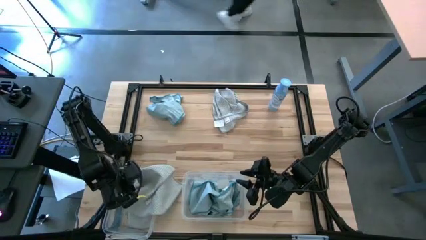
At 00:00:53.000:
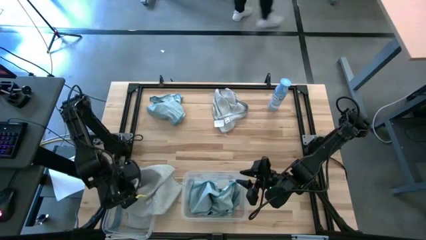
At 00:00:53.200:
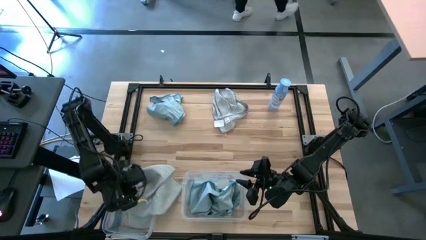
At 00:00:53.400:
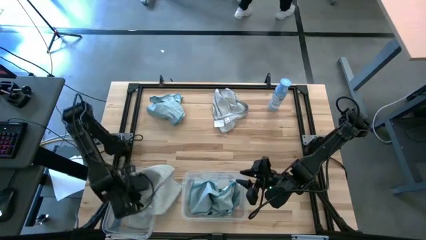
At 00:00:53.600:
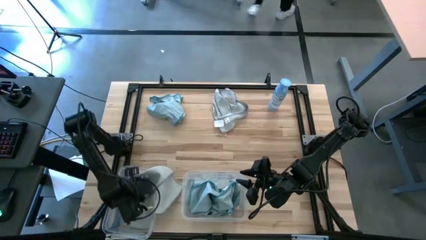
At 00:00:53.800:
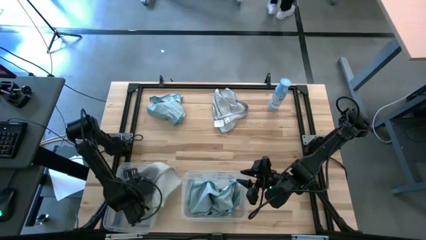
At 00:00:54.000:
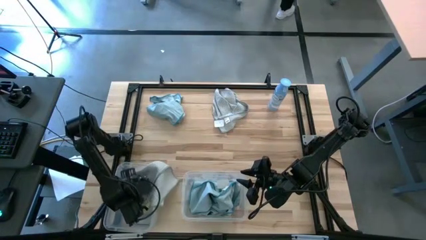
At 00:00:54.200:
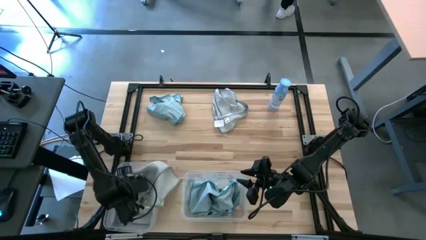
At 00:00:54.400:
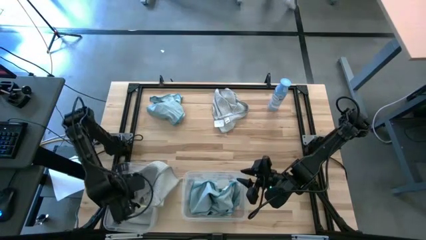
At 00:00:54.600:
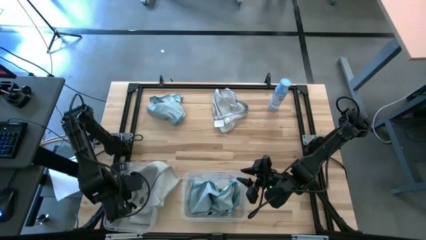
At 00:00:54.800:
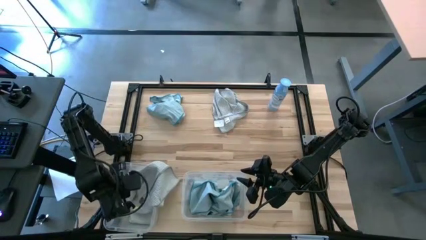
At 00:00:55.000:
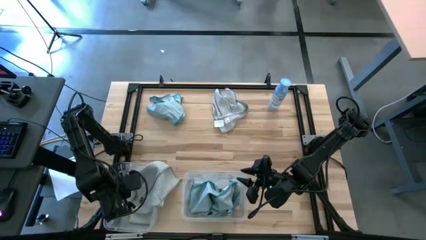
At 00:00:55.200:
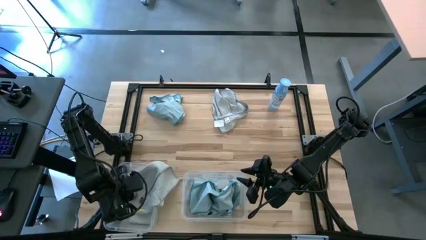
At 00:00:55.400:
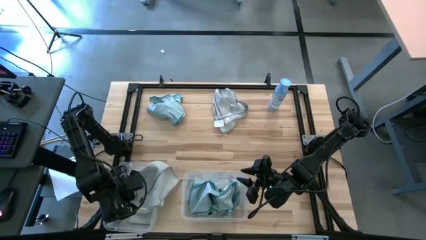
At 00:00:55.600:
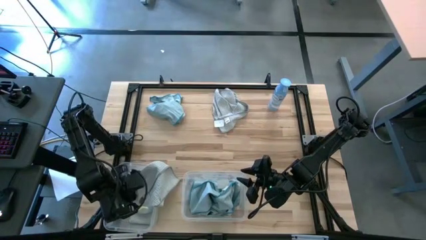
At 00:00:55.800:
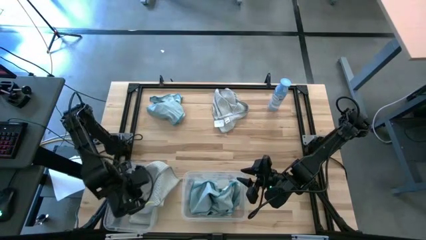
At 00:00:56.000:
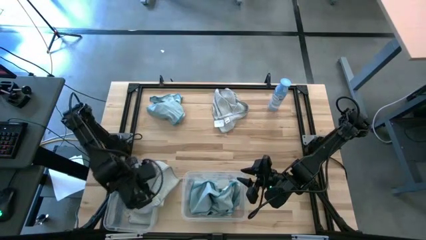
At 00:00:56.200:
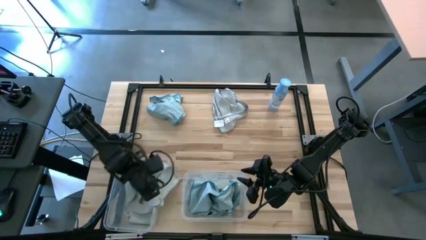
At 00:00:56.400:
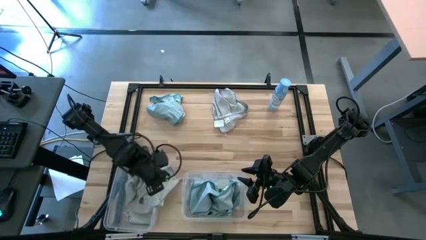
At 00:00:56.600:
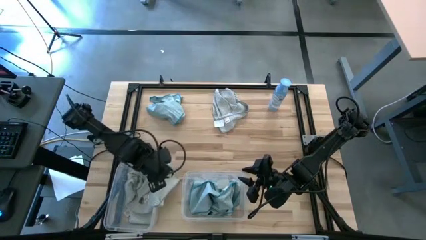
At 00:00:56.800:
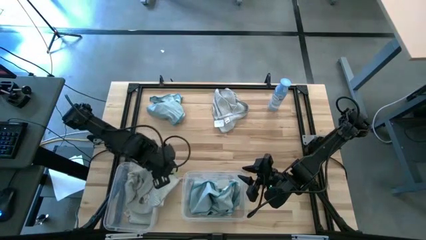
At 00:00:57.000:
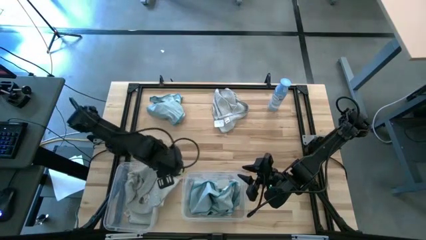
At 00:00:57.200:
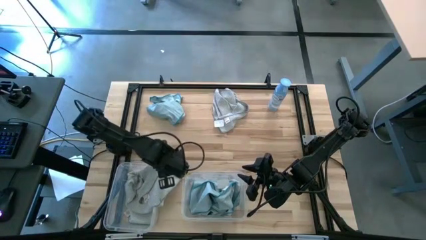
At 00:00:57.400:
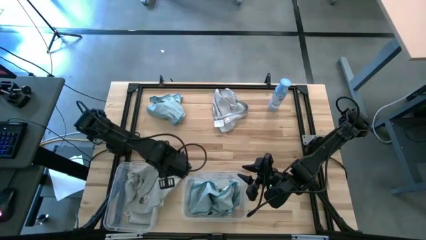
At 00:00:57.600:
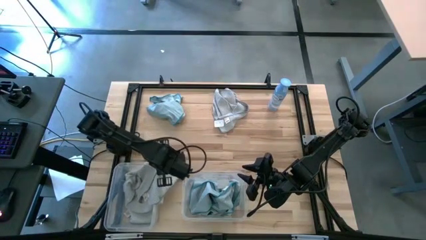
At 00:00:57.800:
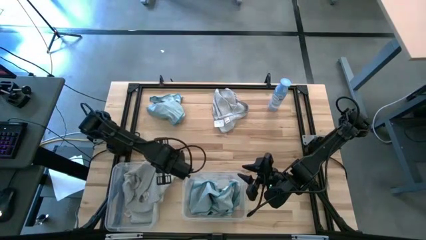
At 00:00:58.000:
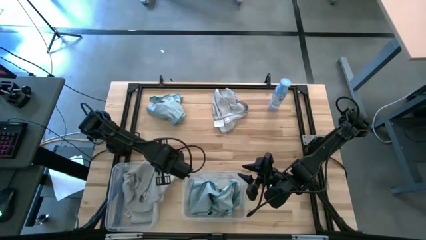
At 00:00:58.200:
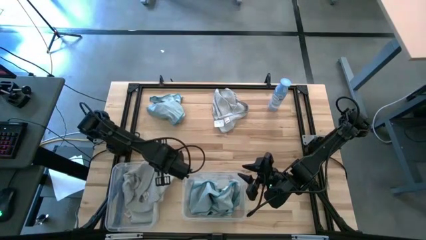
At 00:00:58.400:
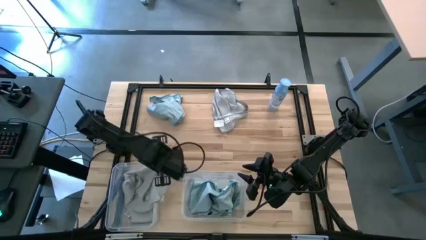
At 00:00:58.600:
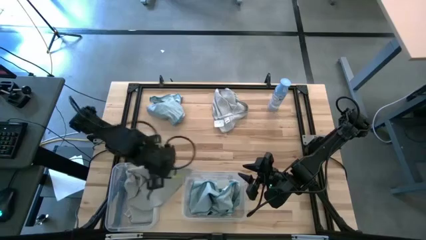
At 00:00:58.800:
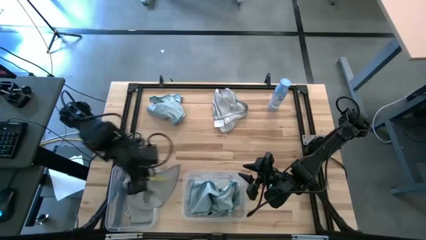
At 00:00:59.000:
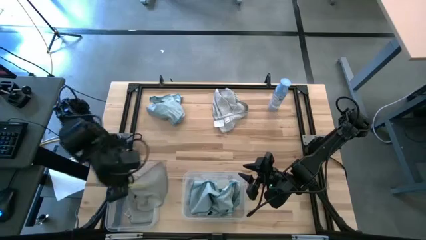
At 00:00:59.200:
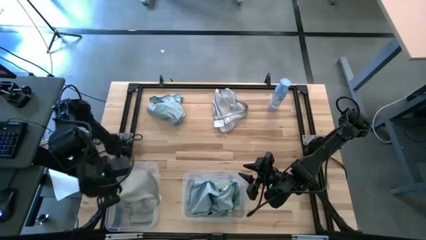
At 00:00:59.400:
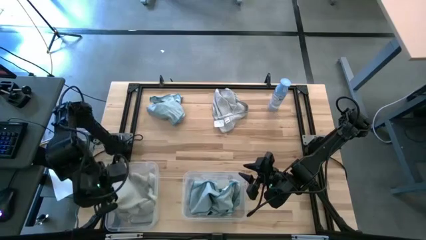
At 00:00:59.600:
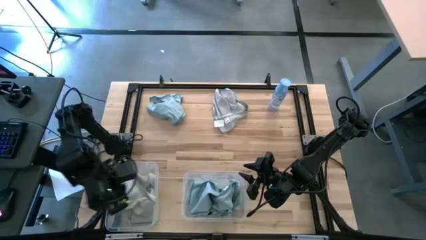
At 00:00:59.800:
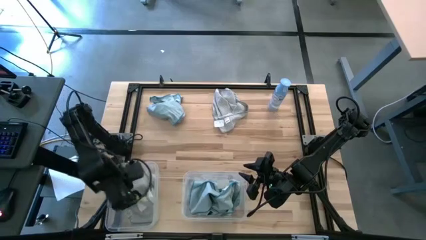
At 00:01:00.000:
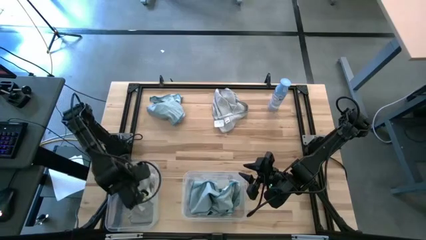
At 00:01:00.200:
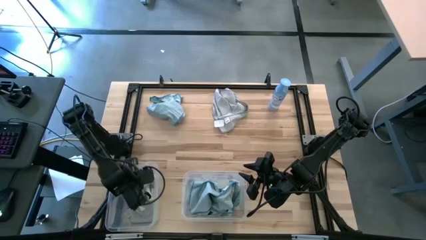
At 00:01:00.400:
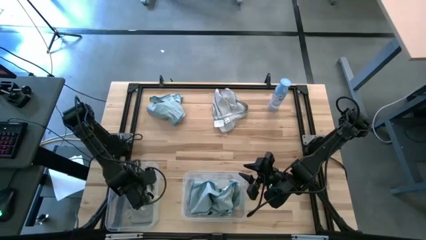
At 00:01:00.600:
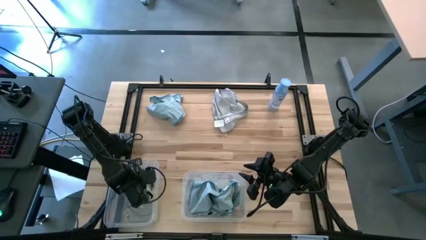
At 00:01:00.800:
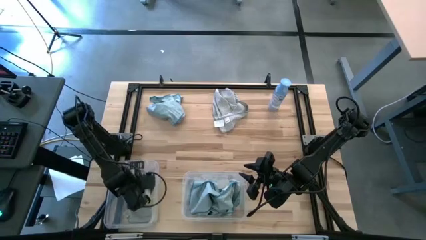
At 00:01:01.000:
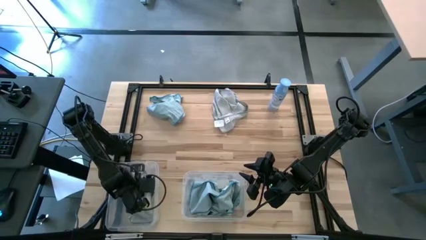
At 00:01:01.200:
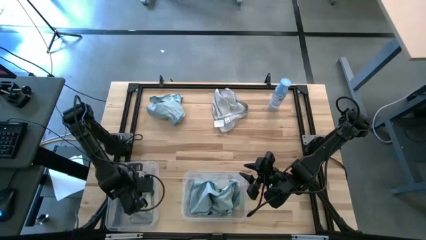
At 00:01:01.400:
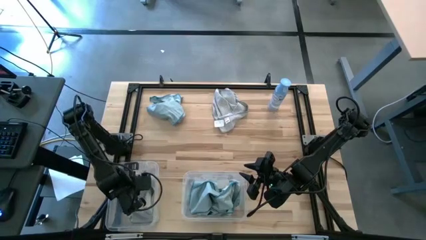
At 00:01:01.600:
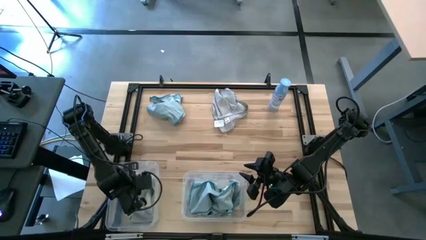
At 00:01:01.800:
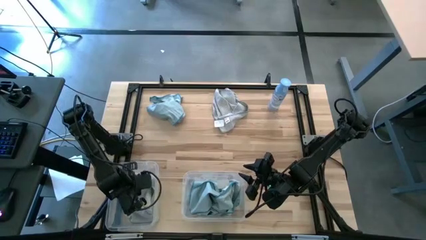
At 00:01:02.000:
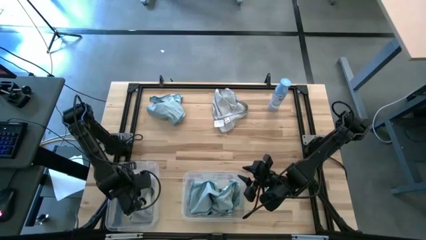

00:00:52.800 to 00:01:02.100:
Task: Sort microfiber towel by color & place in baskets
Put the bottom left grey towel into the left transparent bin

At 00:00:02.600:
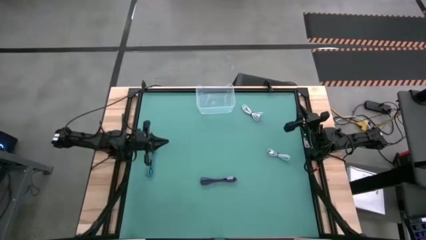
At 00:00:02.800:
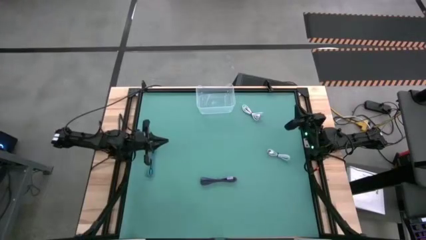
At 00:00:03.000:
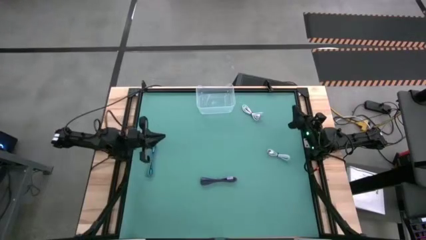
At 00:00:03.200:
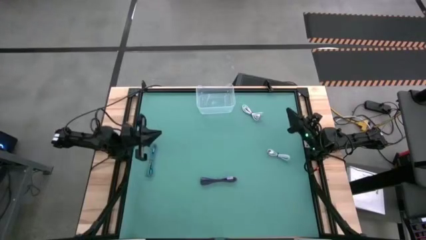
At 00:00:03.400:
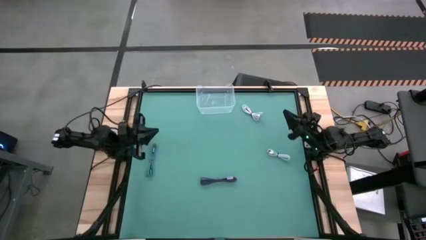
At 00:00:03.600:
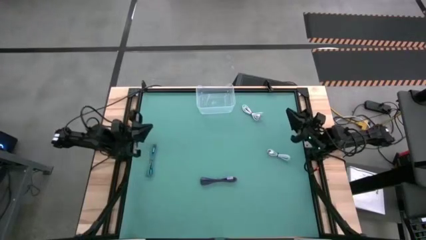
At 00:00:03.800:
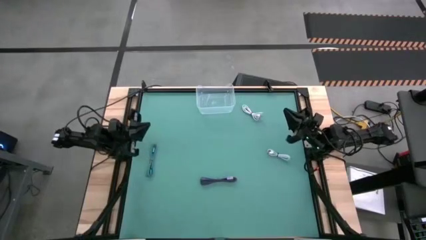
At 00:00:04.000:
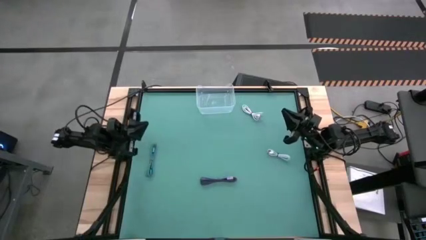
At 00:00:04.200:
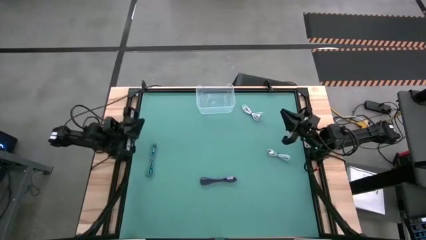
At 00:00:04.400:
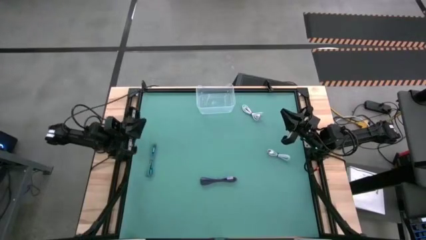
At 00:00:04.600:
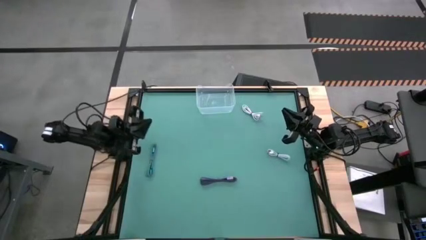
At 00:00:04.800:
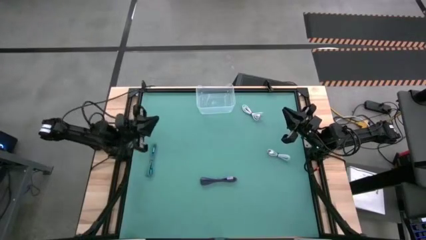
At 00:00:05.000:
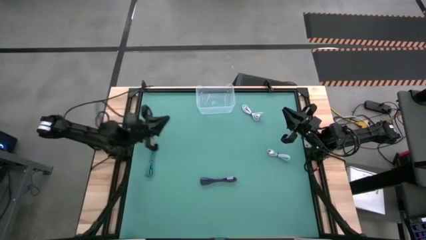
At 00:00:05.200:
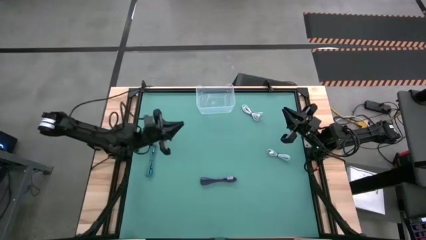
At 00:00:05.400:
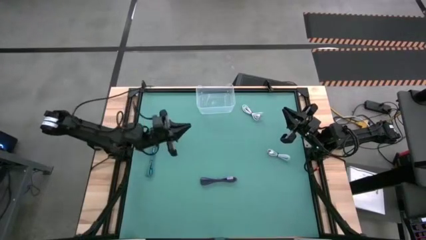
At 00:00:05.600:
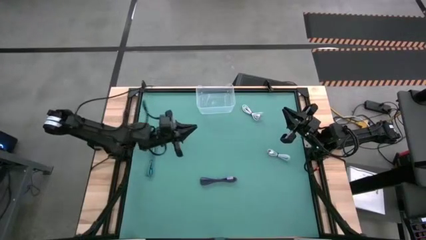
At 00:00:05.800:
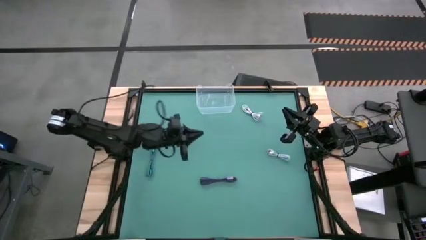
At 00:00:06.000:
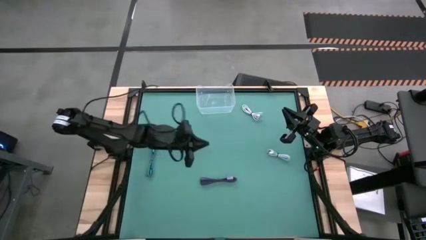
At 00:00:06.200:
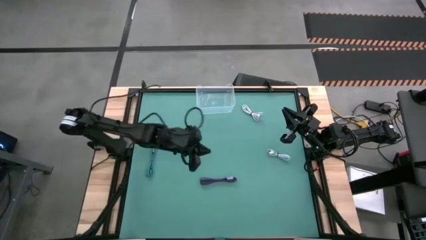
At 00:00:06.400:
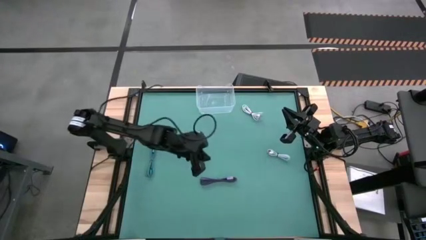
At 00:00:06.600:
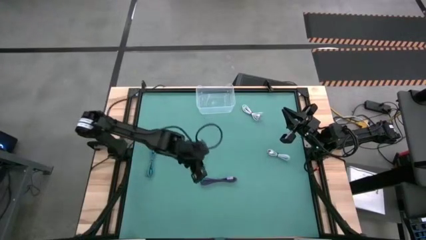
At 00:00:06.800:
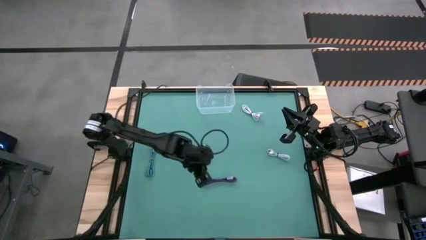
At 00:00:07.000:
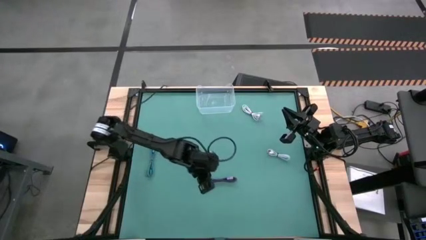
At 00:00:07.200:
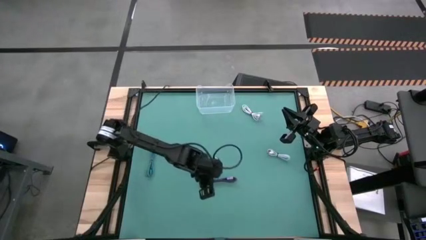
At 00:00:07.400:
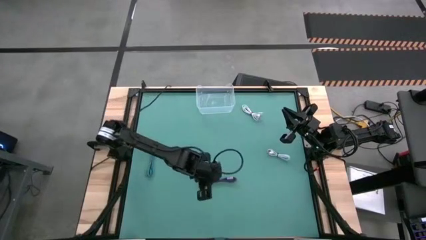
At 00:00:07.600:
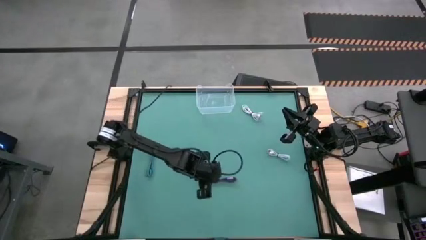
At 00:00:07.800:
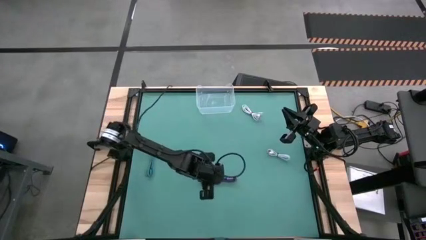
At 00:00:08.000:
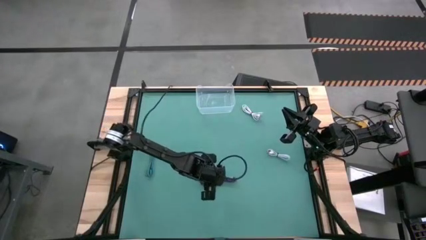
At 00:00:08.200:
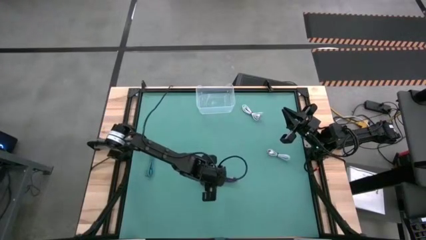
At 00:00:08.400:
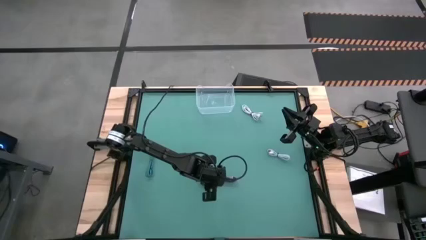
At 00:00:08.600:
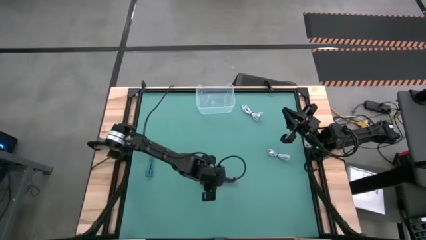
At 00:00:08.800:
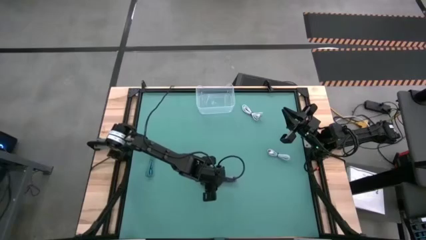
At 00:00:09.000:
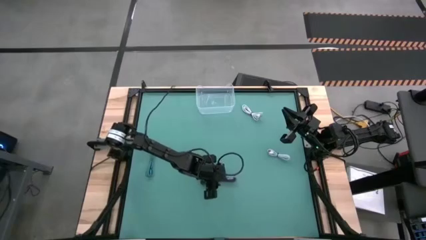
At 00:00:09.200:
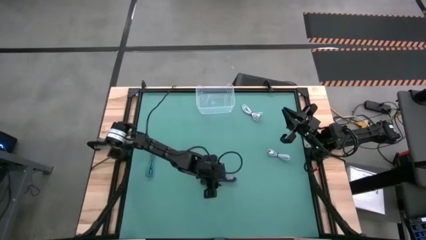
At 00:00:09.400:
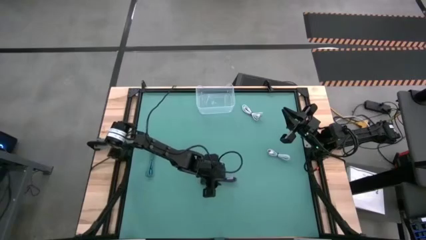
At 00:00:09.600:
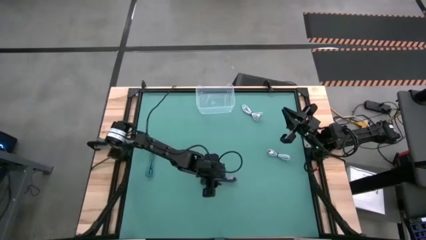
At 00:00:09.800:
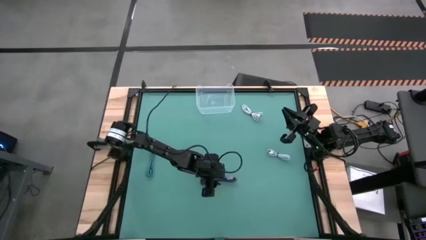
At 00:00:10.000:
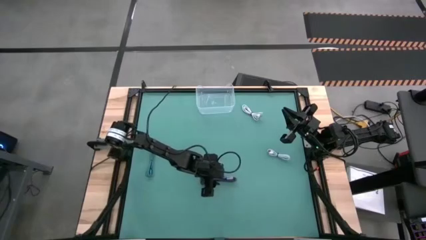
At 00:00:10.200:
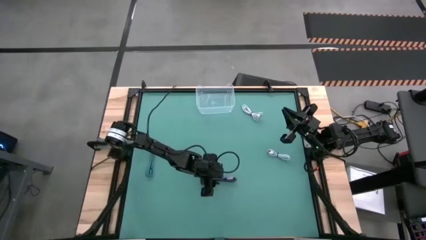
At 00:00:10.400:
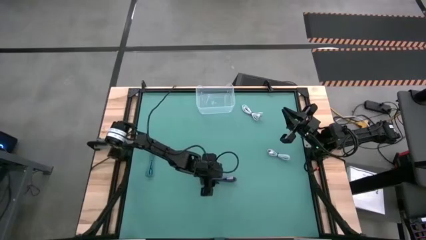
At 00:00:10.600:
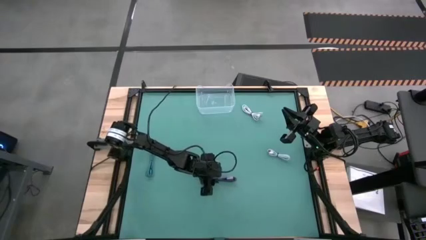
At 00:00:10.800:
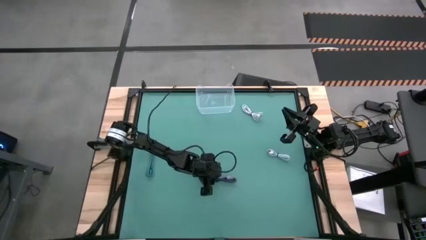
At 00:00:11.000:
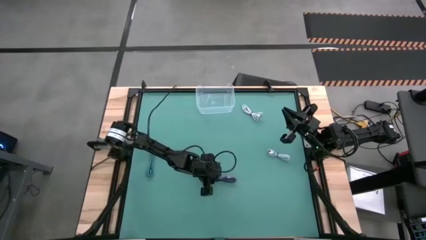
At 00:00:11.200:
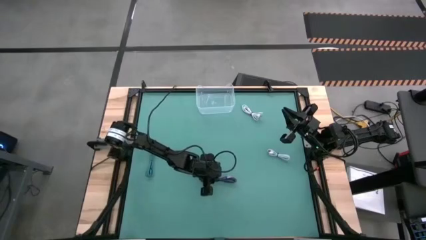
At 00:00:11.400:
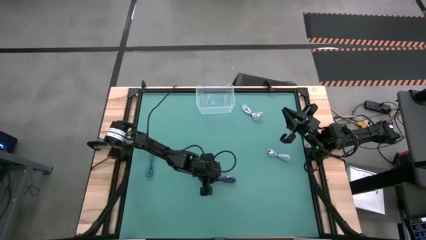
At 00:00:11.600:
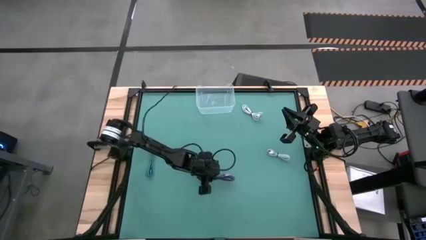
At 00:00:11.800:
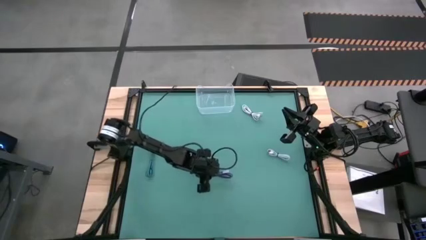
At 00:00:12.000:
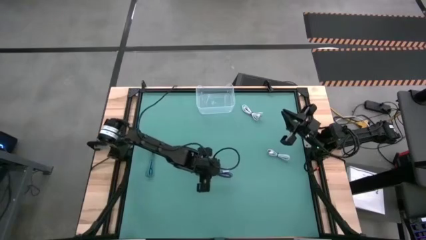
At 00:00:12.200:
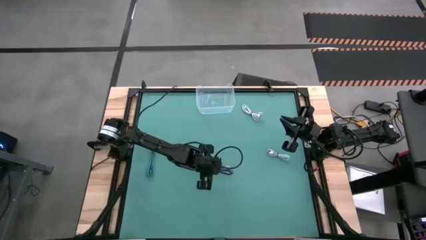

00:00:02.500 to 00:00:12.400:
Task: Pick and place USB-C Cables
Put the purple charger cable into the transparent bin
